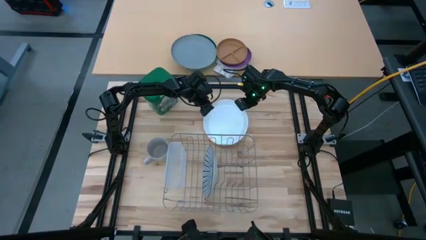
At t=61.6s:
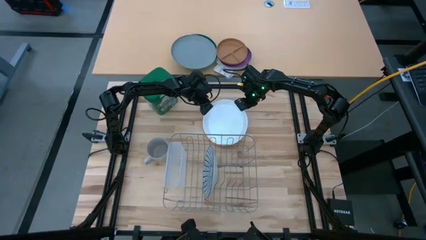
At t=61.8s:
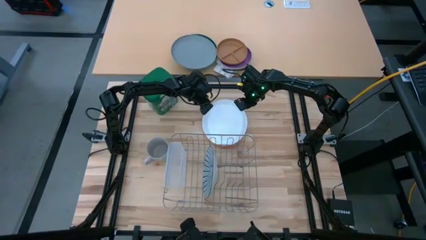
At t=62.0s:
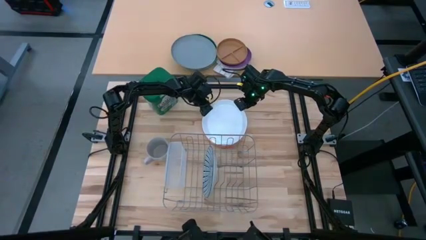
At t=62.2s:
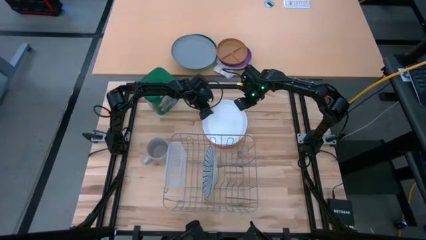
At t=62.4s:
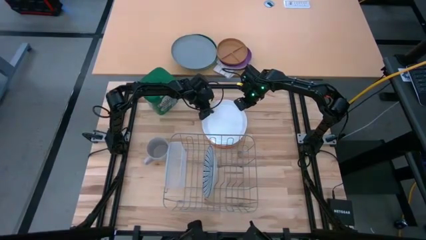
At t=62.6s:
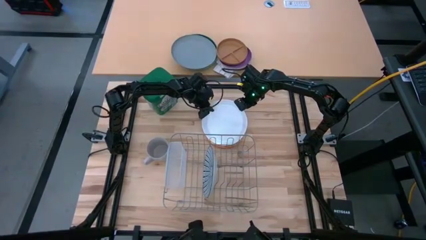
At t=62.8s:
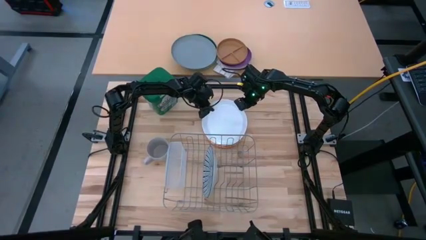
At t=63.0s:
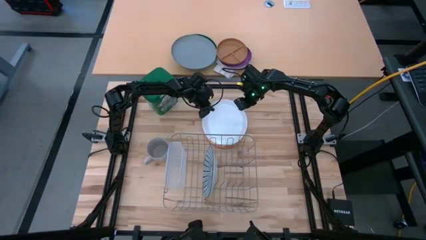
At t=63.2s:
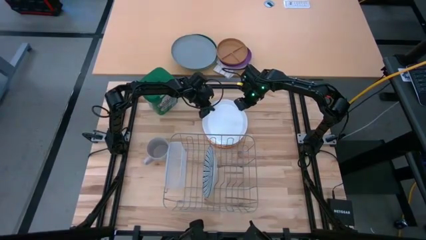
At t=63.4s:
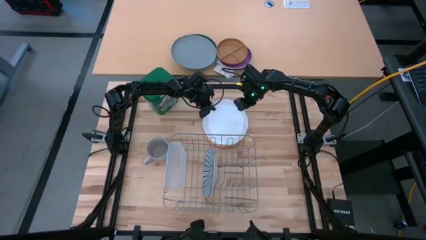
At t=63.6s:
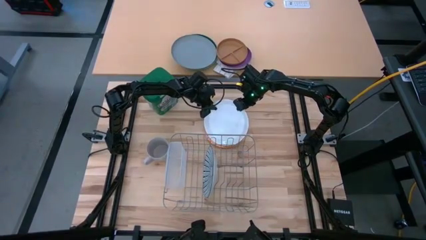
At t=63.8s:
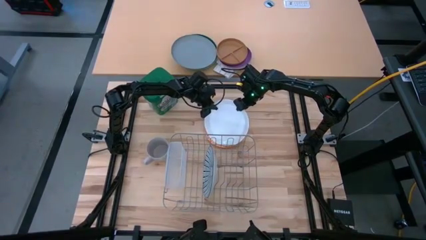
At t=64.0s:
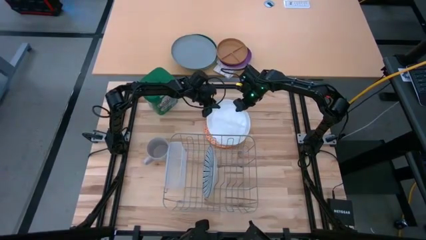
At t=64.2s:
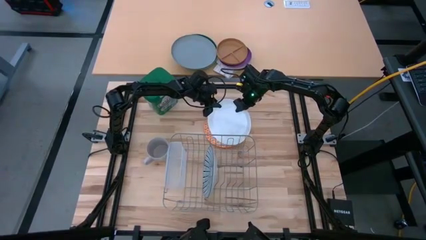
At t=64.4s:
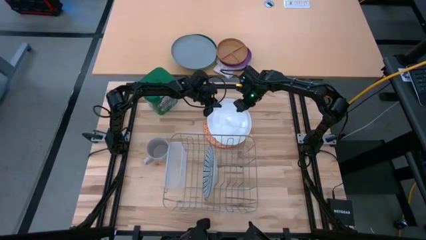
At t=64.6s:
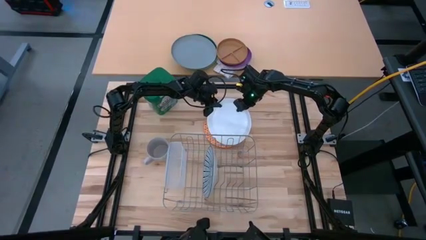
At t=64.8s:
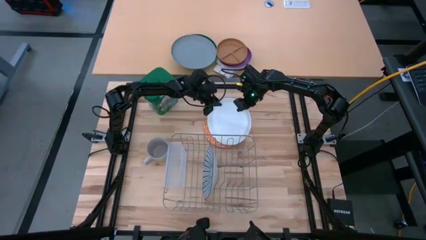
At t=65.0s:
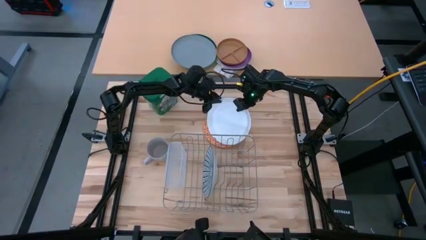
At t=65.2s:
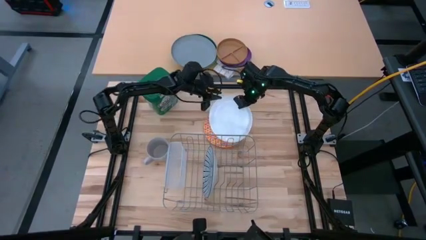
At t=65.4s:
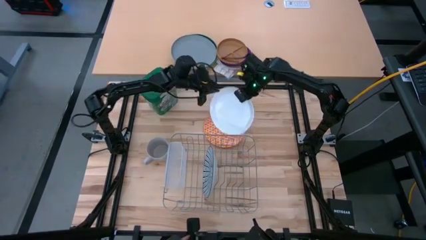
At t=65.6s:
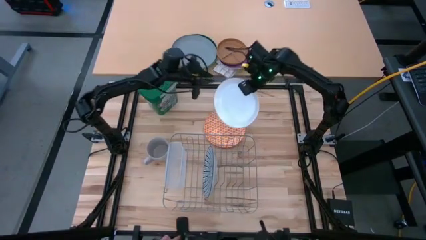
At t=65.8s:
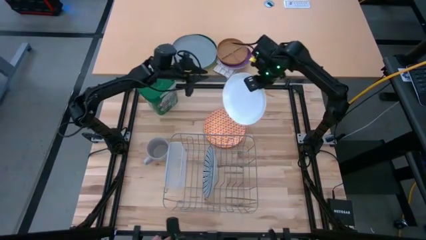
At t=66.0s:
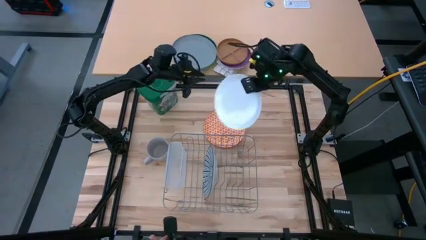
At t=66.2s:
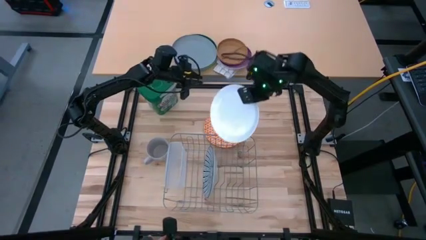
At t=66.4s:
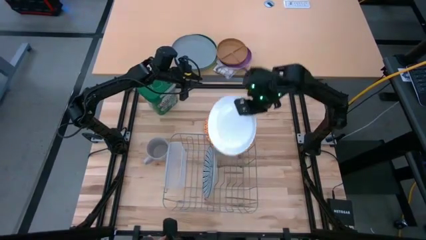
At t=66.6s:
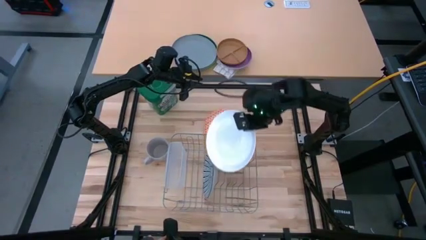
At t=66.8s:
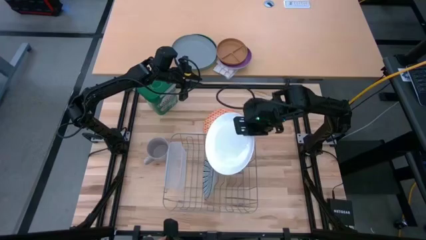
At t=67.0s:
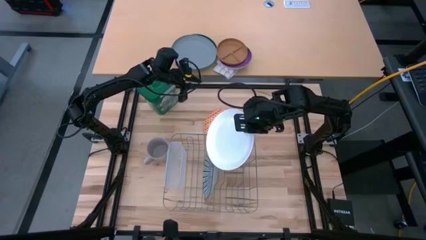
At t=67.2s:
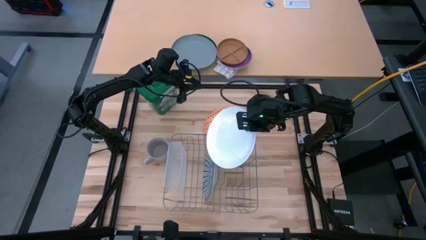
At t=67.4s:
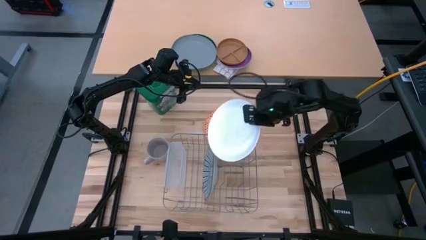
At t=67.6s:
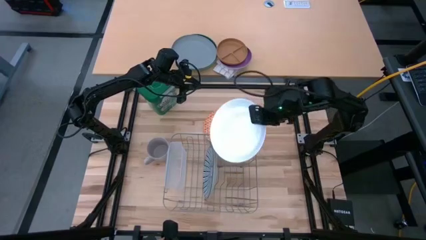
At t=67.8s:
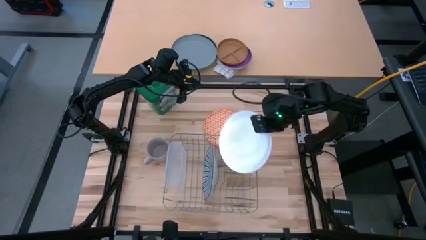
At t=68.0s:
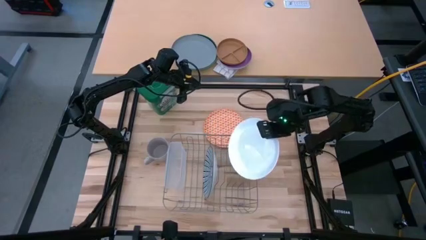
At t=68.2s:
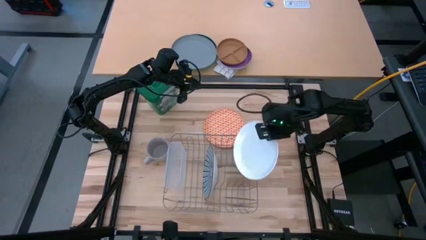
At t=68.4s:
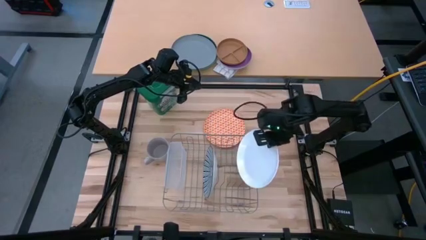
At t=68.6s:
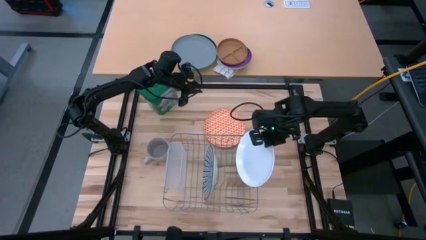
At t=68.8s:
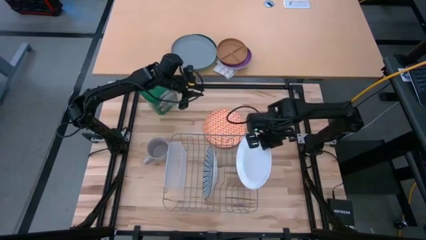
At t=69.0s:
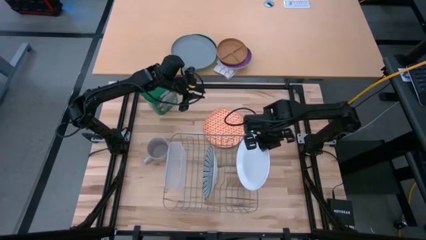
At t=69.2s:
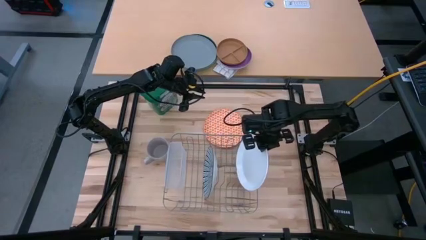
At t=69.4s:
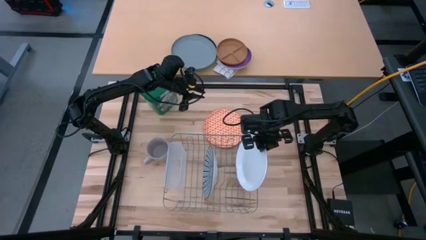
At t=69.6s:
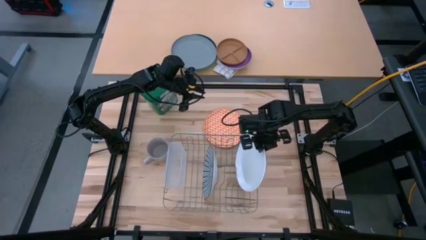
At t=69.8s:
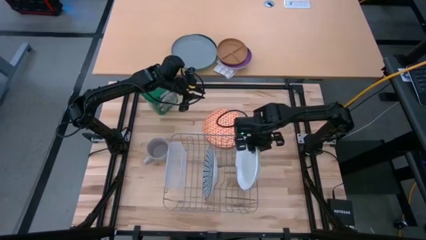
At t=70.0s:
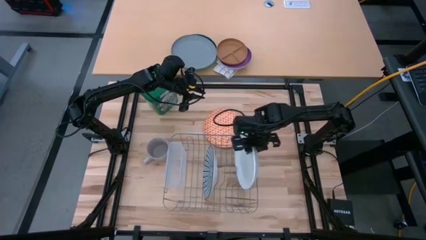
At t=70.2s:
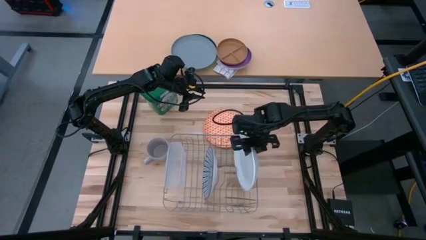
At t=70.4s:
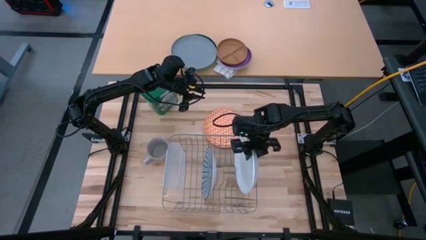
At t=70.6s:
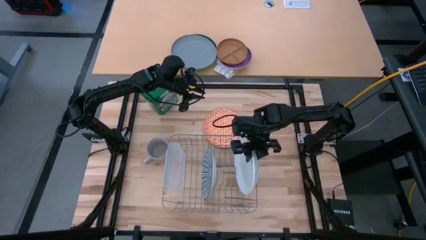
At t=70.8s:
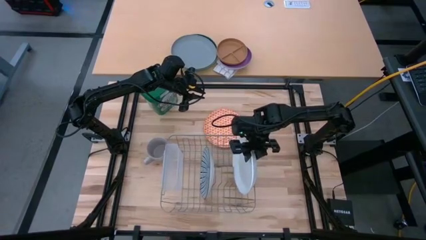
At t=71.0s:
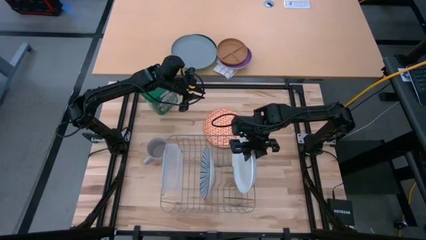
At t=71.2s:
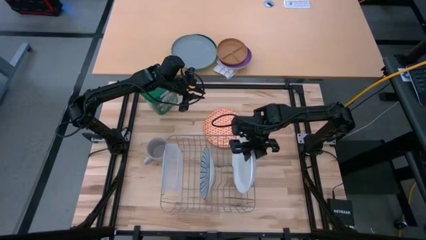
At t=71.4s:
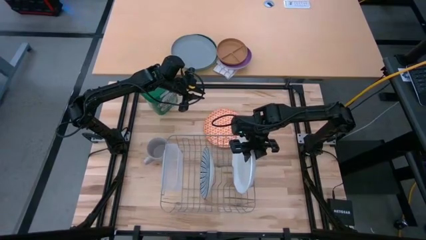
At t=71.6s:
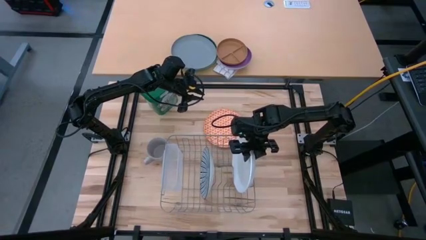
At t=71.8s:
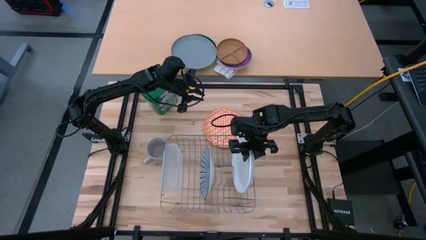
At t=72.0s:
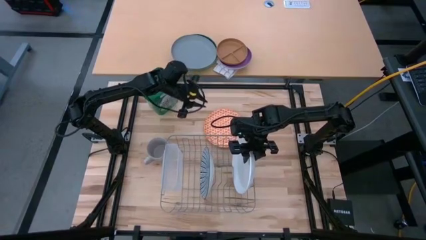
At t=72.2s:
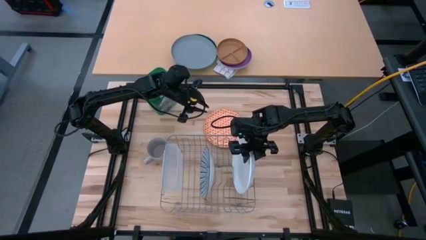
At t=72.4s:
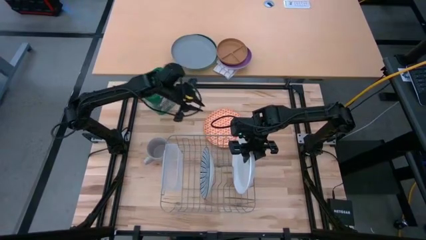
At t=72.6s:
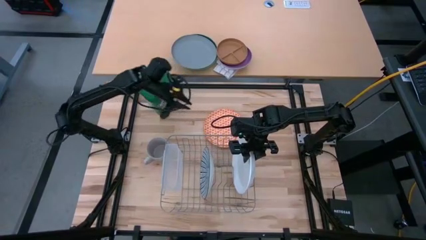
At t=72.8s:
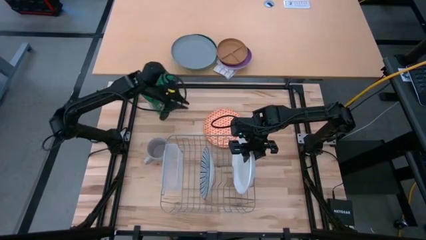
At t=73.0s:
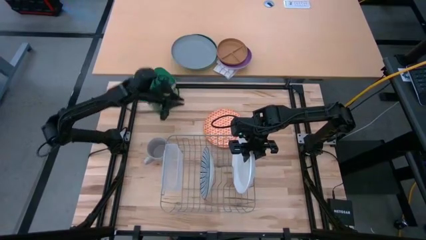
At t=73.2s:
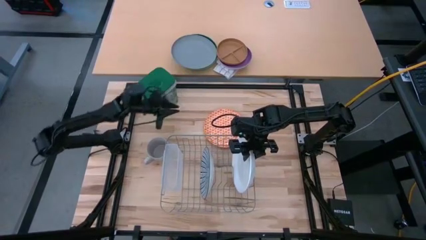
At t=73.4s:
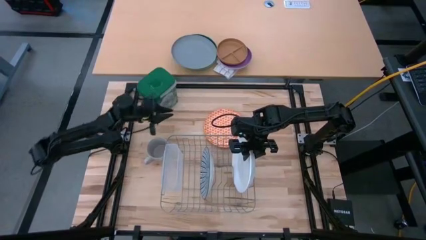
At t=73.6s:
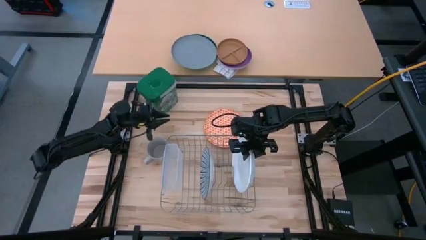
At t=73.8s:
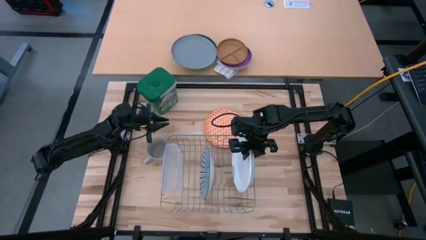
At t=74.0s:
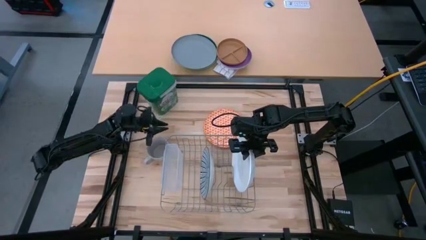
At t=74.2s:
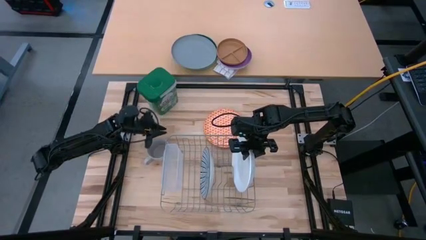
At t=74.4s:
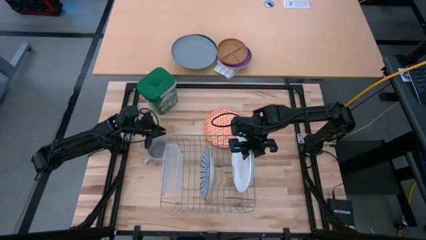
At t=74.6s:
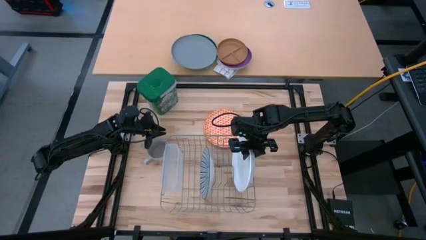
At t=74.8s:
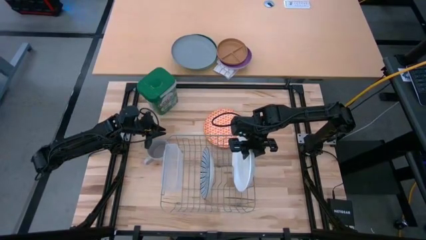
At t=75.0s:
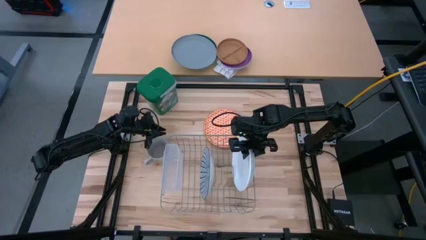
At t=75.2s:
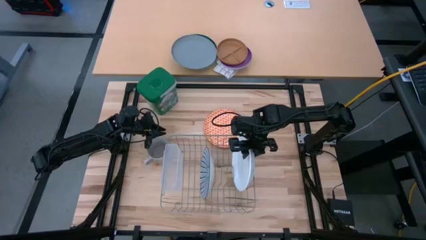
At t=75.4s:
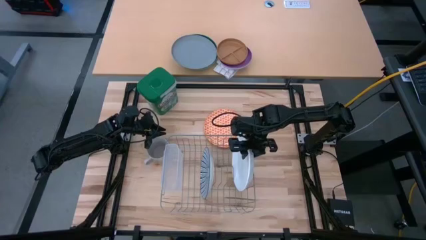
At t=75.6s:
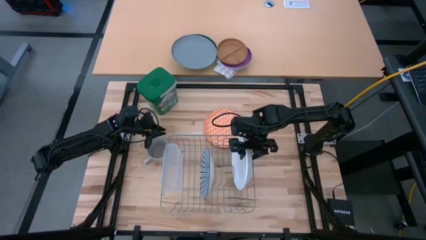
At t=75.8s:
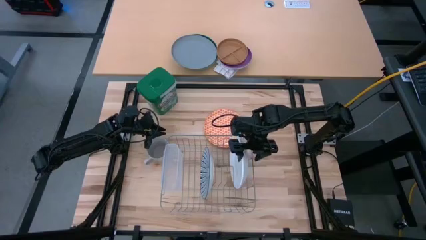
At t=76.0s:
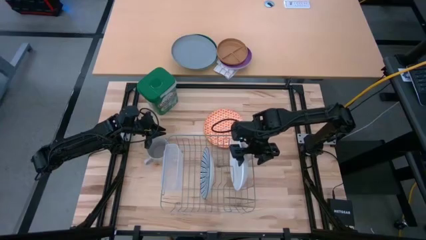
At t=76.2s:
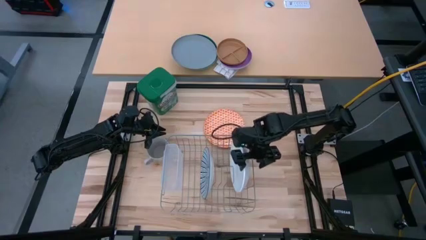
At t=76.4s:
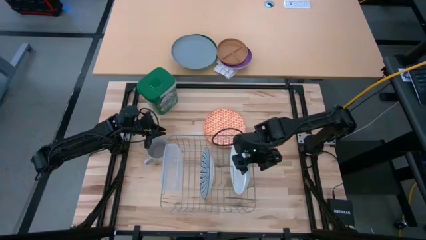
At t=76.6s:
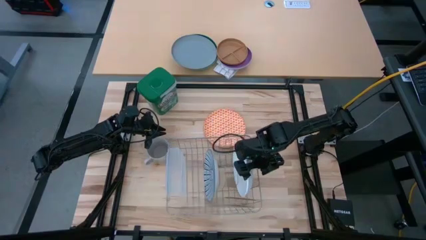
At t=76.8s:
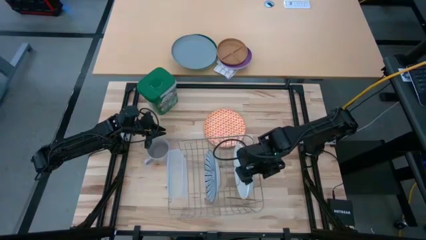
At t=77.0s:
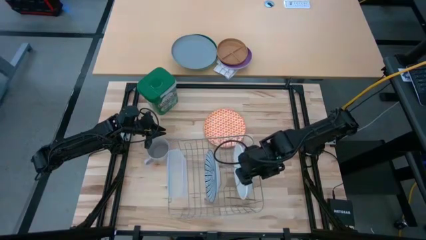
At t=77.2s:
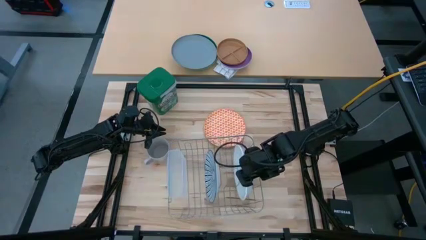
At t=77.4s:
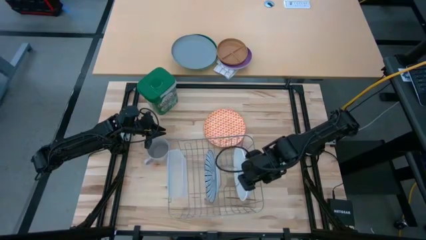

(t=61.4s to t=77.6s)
Task: Sort dishes
Put the white plate in the dish rack
